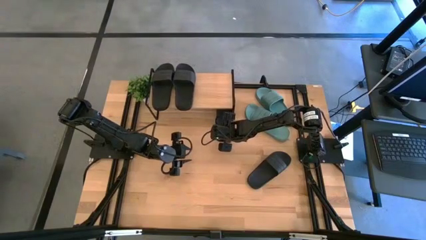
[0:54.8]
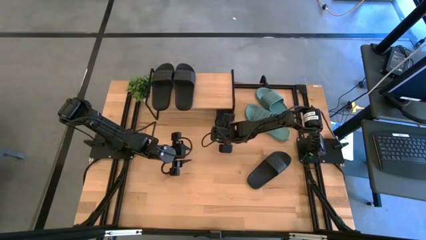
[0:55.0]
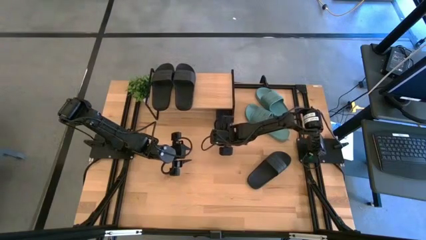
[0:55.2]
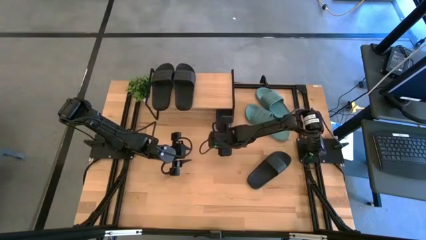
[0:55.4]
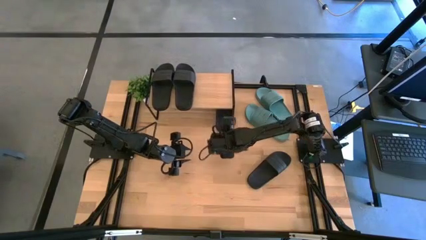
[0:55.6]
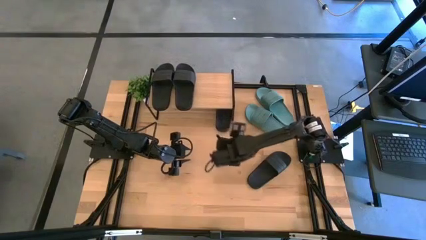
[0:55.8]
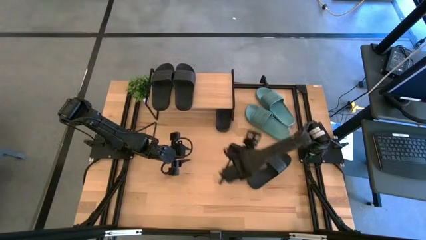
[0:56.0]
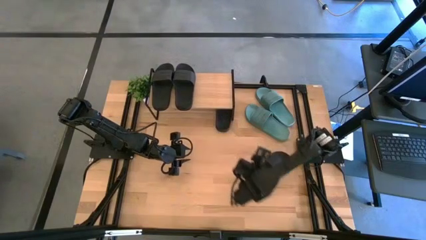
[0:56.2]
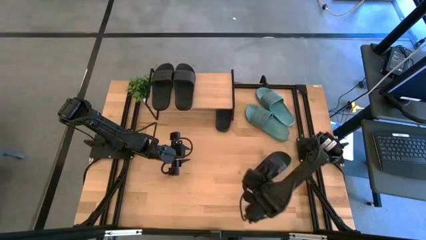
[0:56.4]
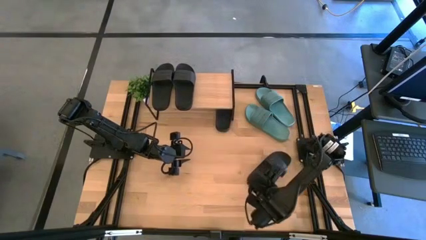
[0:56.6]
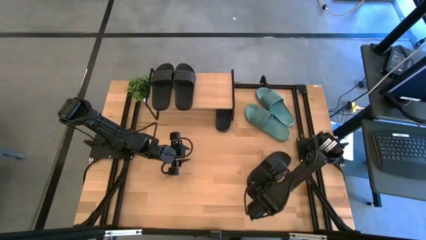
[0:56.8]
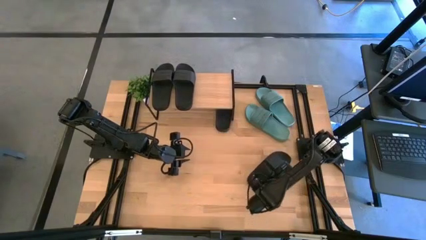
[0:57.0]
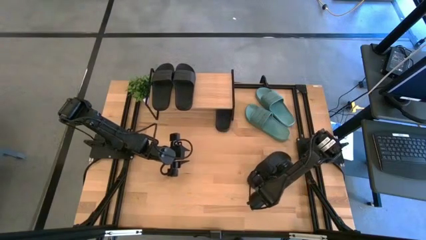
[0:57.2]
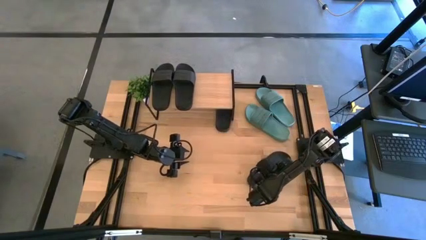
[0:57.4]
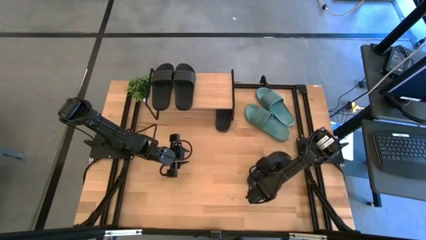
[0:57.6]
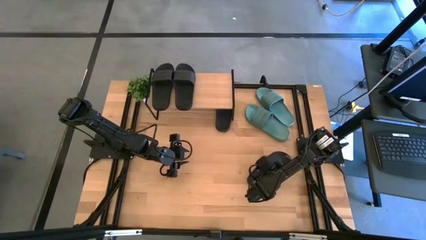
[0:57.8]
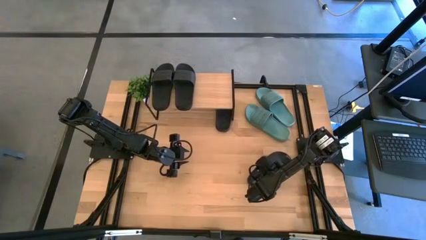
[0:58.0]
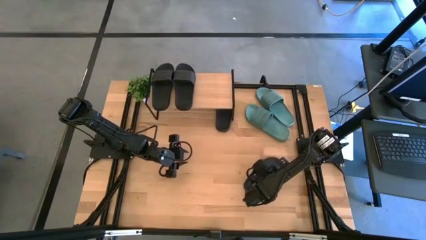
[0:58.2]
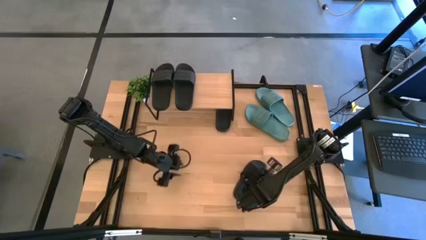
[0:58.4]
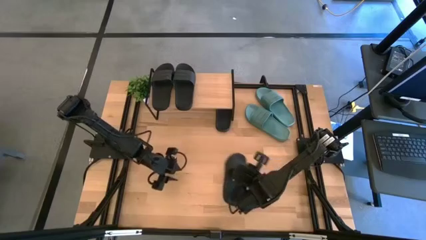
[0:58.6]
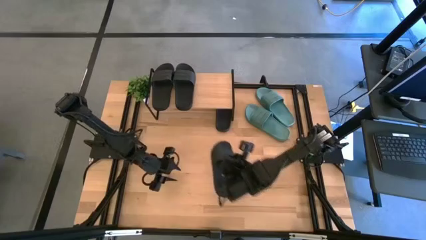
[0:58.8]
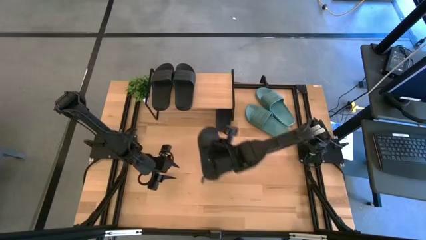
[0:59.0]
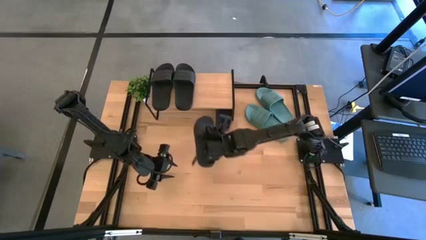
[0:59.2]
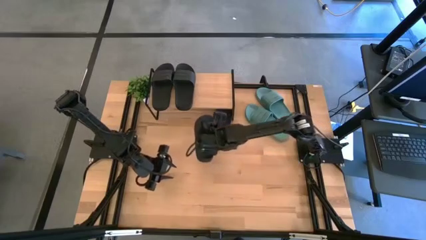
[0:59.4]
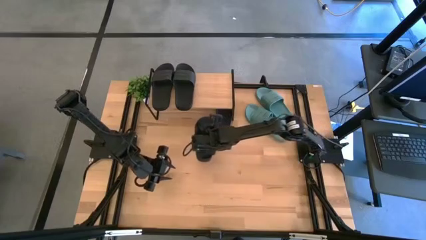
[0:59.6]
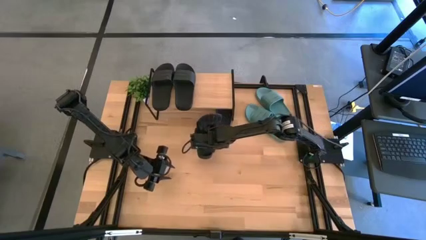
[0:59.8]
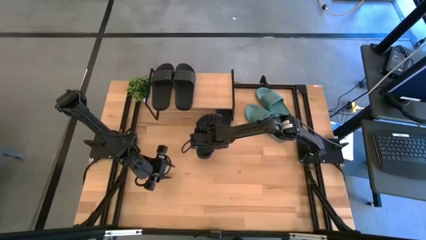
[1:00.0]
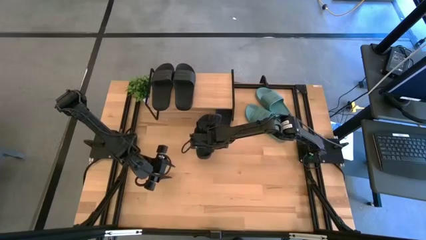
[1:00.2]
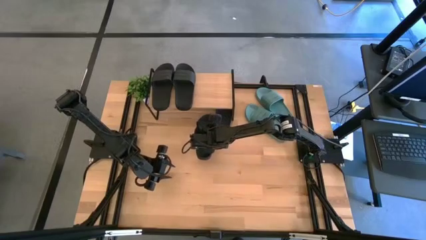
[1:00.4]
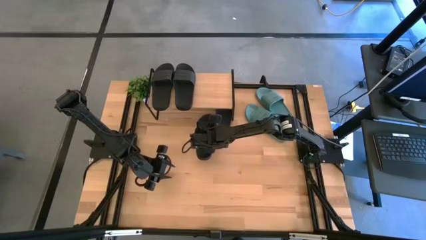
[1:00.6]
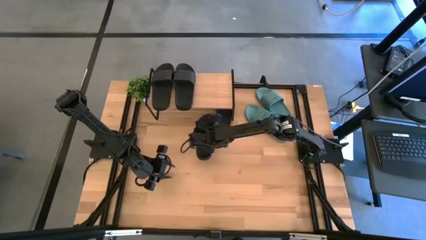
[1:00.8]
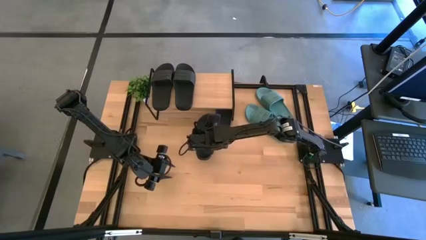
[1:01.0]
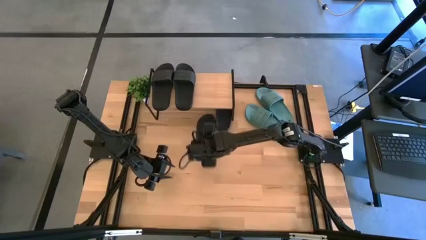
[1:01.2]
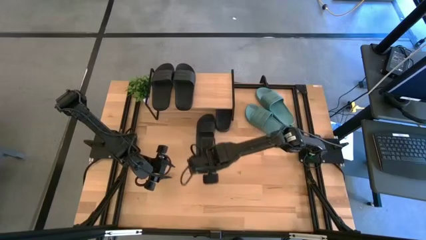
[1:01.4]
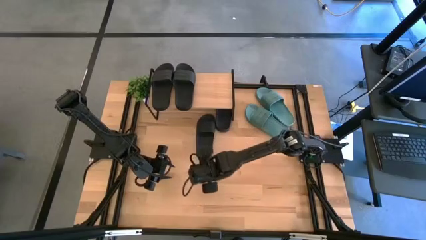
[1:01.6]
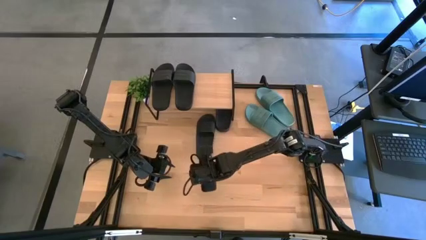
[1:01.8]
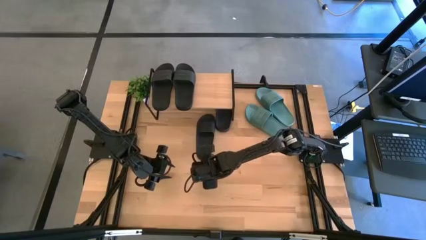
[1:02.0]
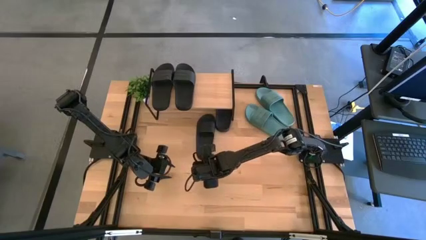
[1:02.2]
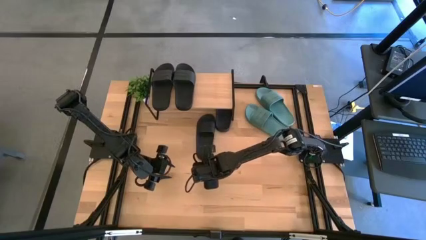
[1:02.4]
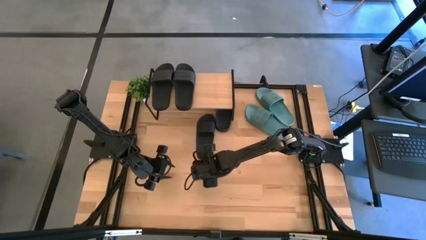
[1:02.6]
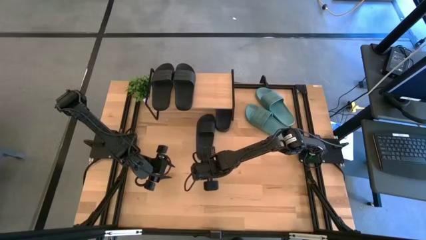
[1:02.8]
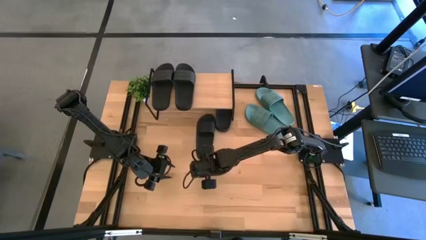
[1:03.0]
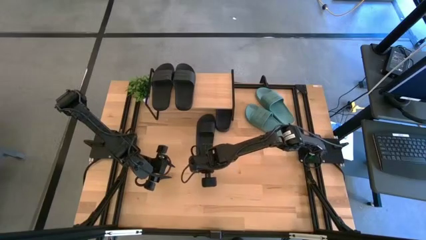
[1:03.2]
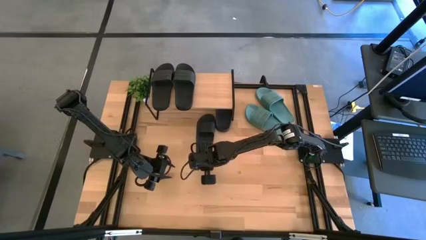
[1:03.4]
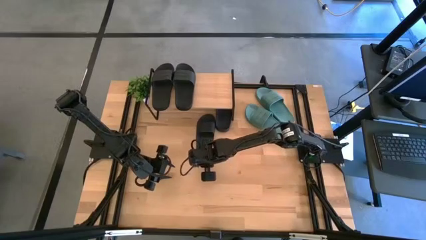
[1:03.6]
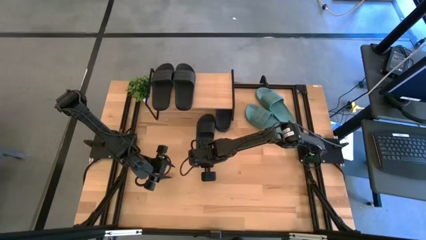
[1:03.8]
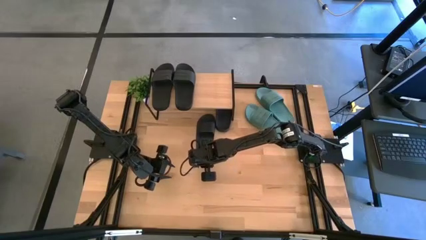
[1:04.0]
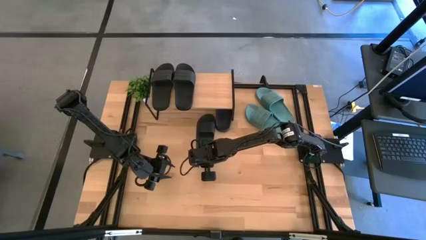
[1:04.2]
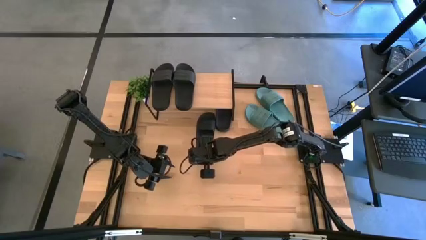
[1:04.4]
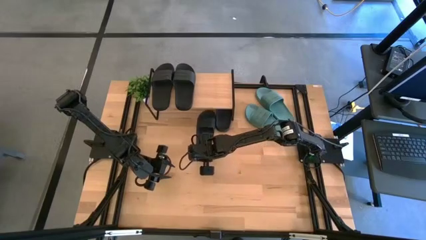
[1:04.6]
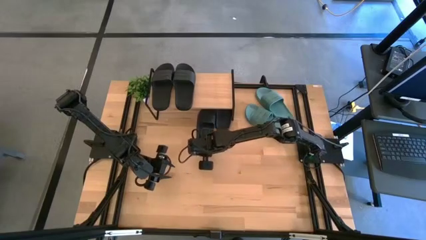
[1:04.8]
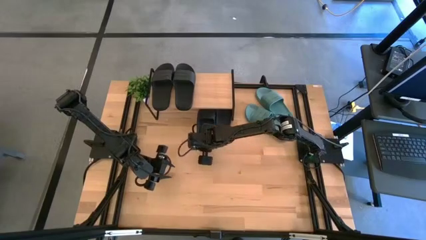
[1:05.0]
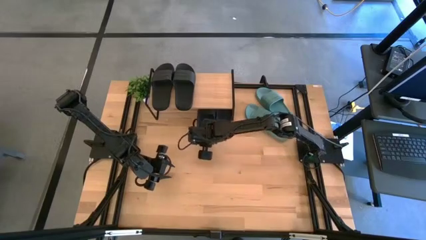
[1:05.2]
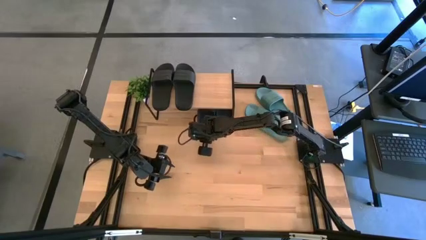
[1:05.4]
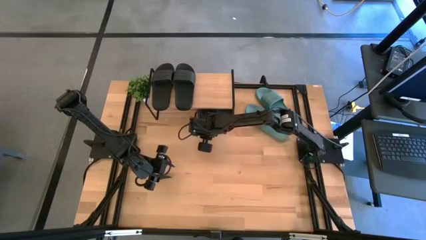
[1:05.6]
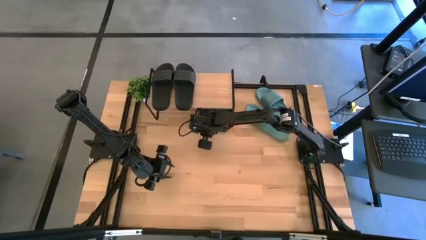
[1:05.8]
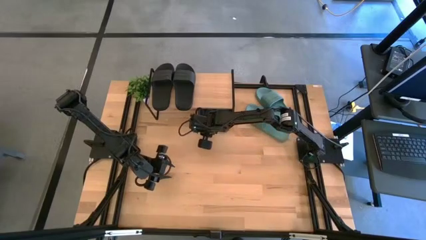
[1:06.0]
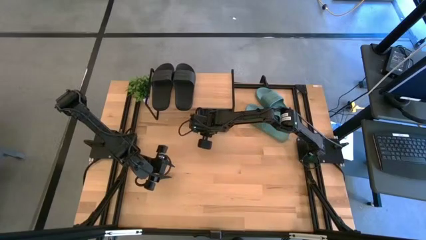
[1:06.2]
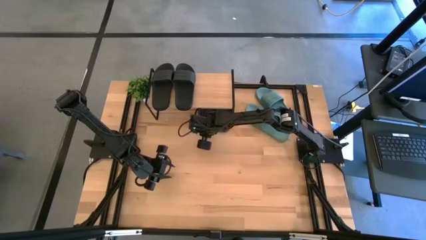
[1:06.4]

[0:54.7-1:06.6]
Task: Pick and place slides into the shelf
Put the black slipper under the shelf
